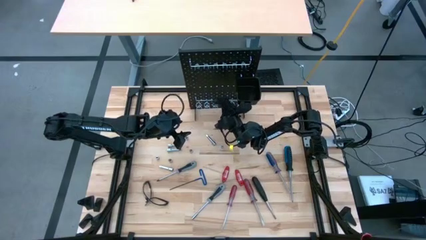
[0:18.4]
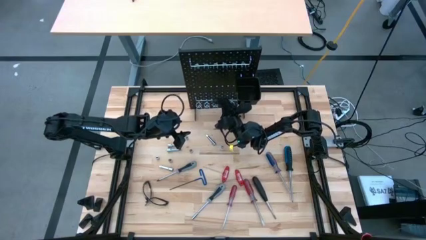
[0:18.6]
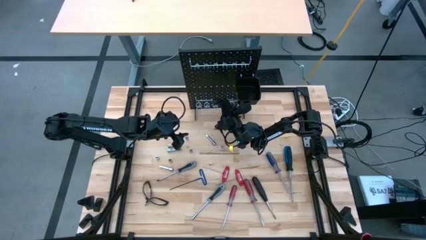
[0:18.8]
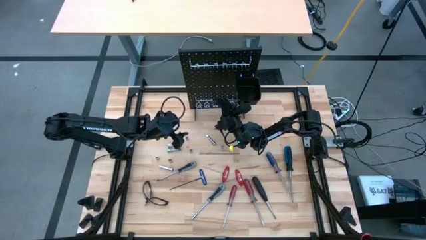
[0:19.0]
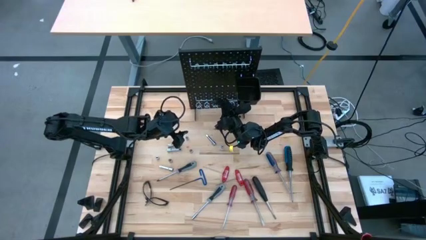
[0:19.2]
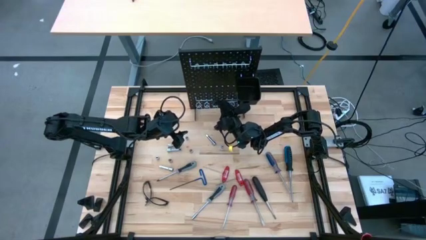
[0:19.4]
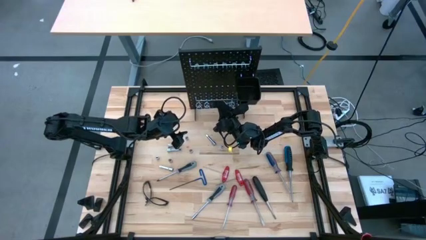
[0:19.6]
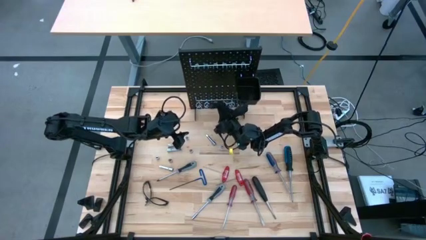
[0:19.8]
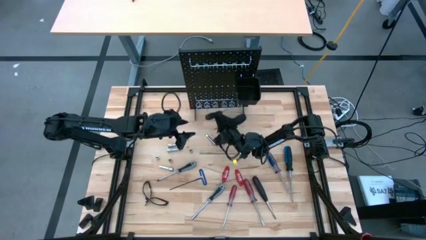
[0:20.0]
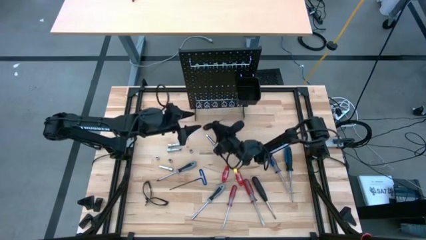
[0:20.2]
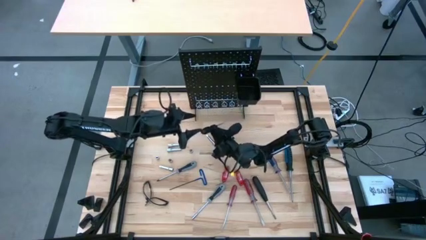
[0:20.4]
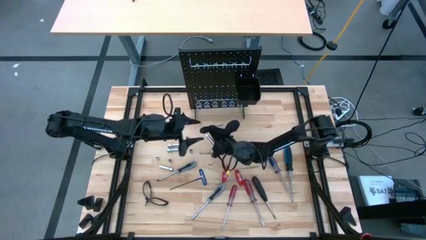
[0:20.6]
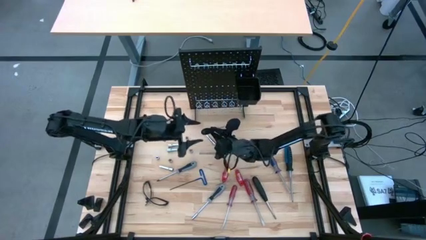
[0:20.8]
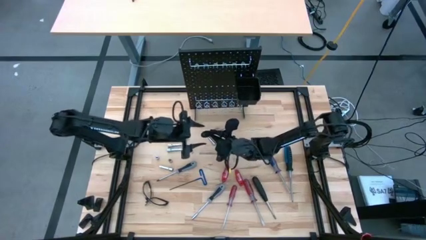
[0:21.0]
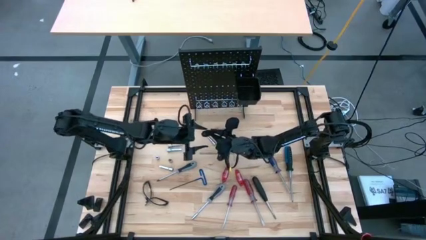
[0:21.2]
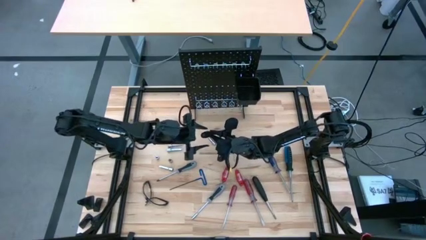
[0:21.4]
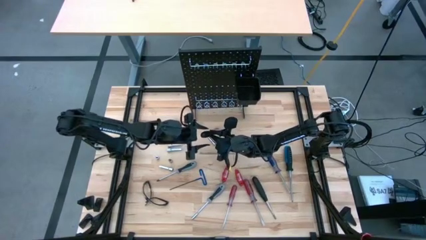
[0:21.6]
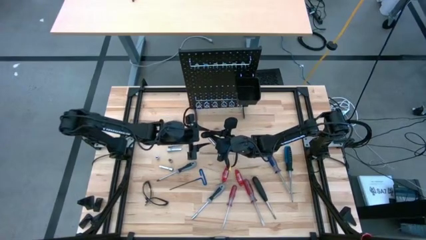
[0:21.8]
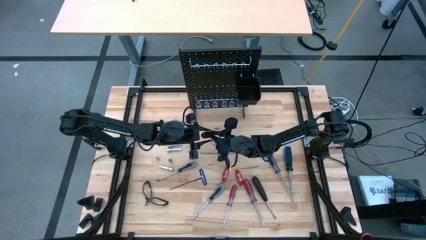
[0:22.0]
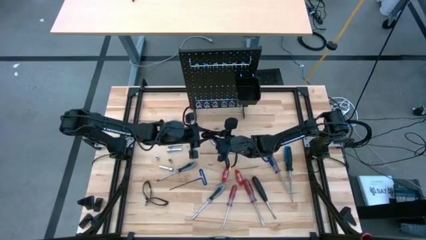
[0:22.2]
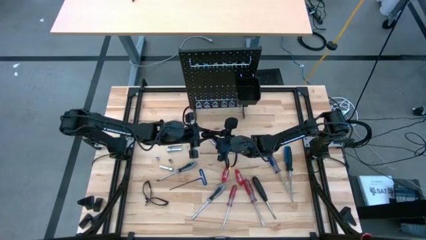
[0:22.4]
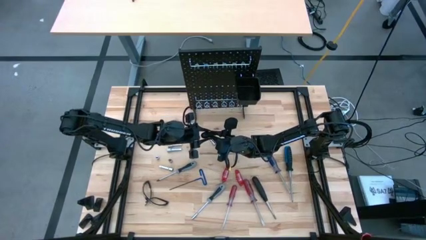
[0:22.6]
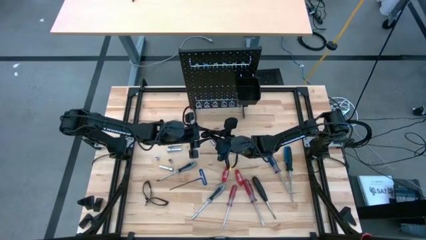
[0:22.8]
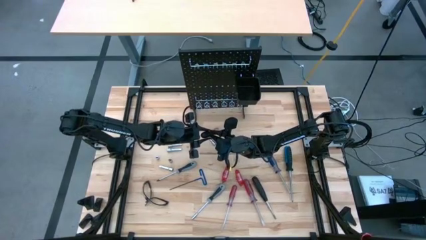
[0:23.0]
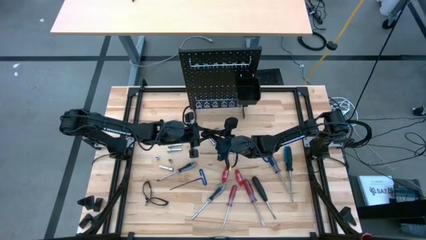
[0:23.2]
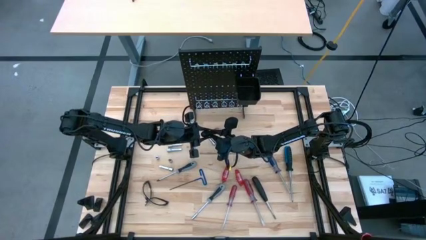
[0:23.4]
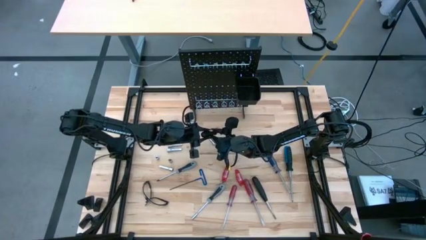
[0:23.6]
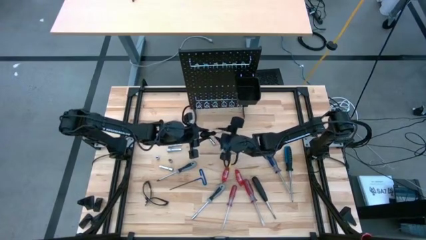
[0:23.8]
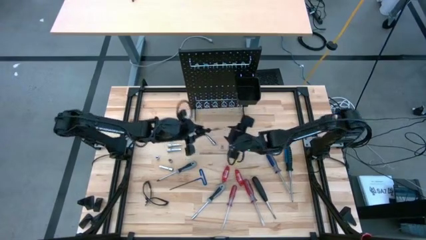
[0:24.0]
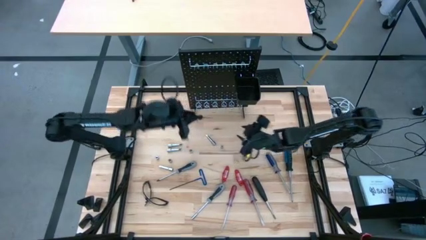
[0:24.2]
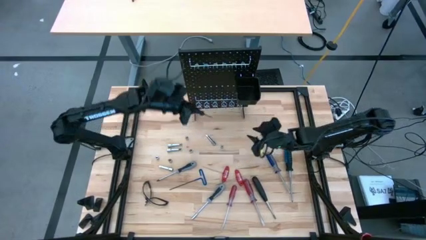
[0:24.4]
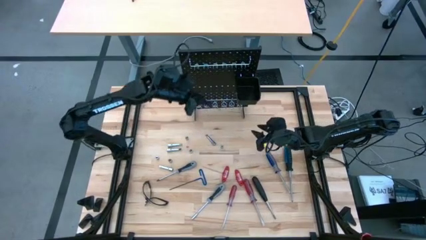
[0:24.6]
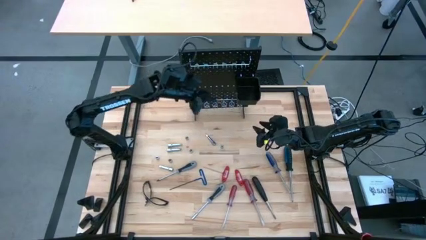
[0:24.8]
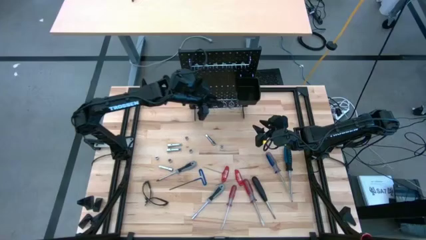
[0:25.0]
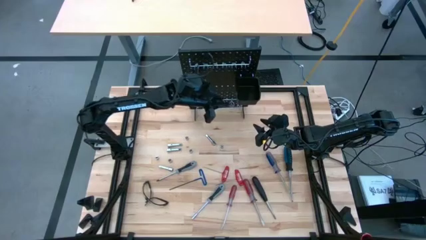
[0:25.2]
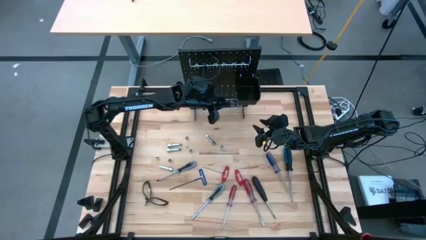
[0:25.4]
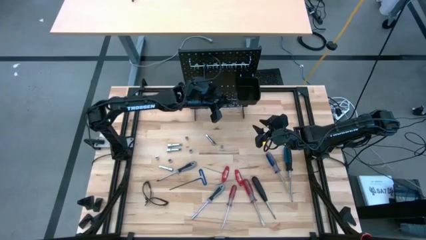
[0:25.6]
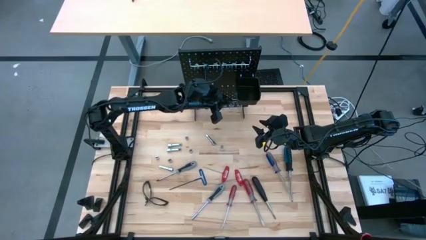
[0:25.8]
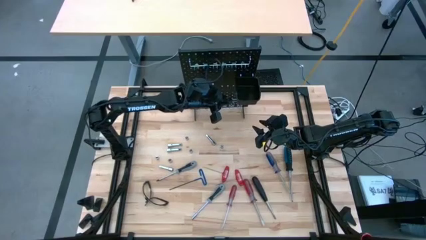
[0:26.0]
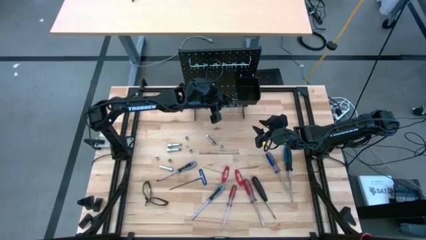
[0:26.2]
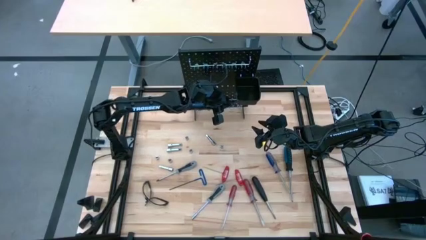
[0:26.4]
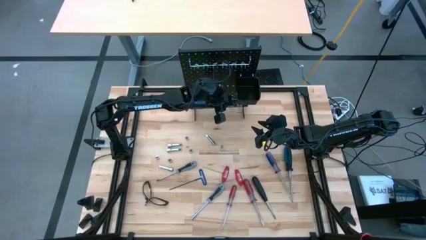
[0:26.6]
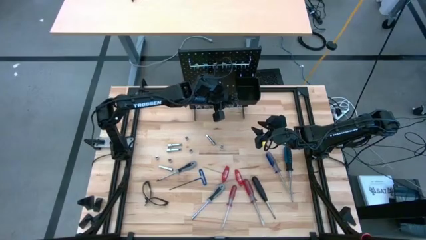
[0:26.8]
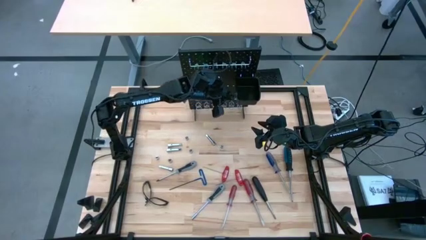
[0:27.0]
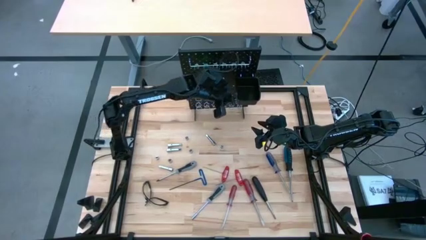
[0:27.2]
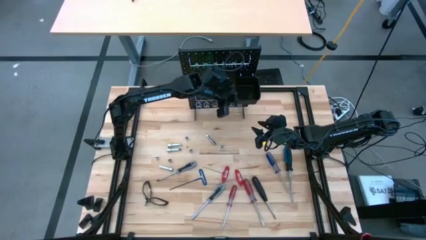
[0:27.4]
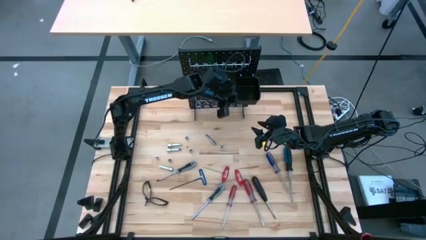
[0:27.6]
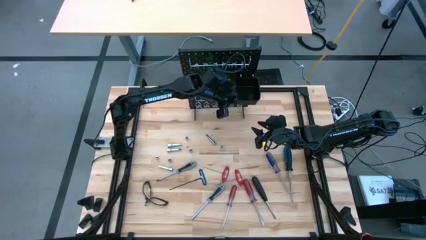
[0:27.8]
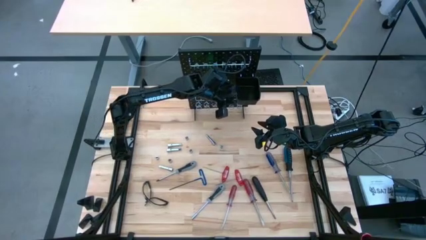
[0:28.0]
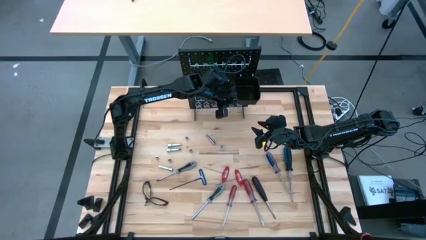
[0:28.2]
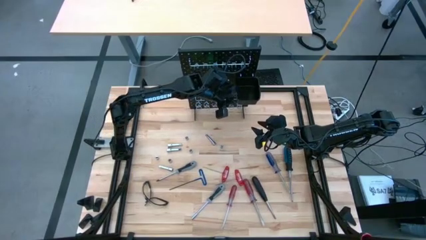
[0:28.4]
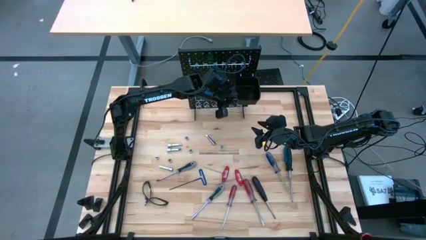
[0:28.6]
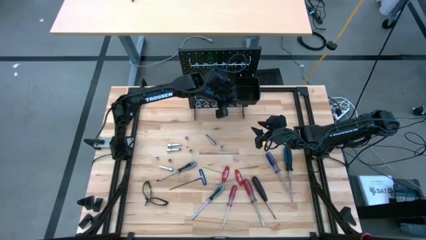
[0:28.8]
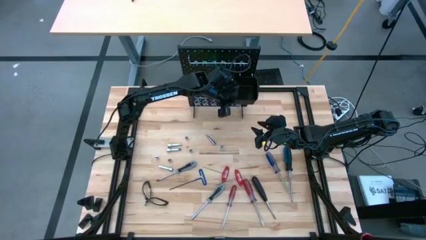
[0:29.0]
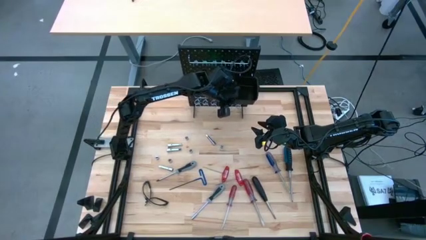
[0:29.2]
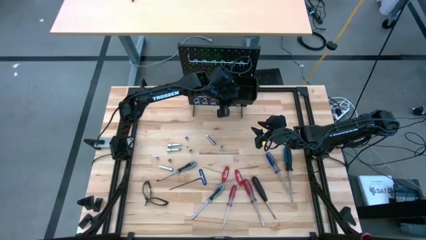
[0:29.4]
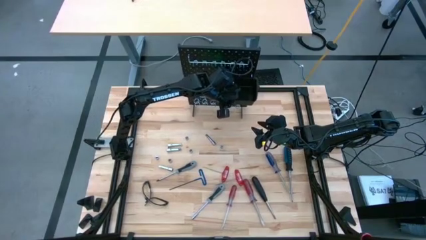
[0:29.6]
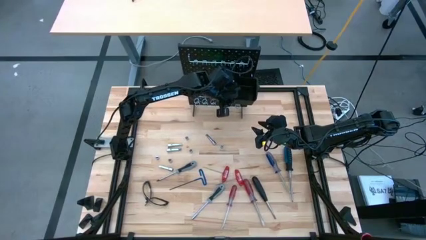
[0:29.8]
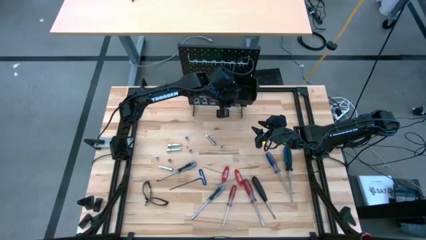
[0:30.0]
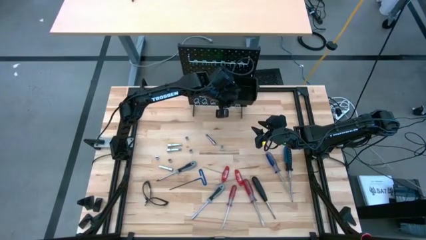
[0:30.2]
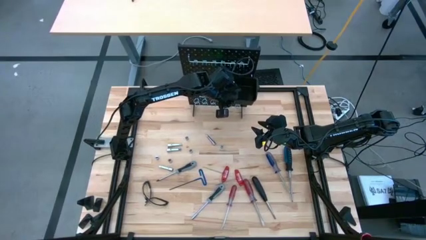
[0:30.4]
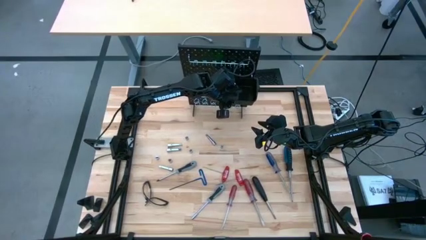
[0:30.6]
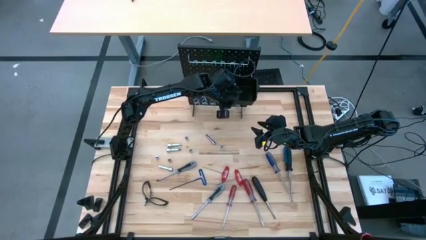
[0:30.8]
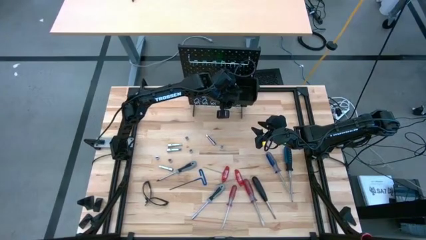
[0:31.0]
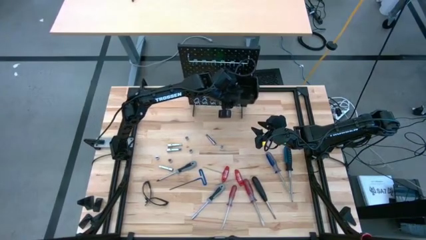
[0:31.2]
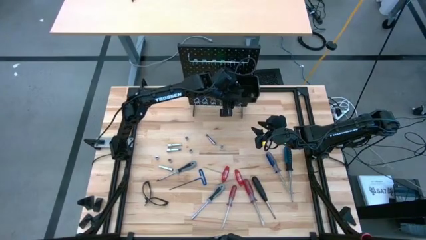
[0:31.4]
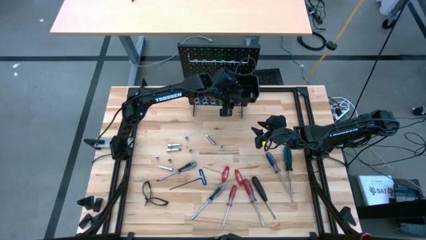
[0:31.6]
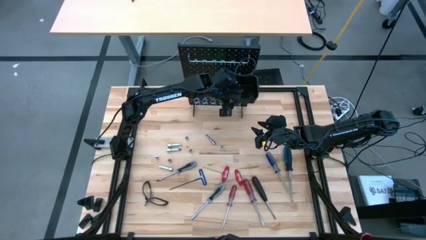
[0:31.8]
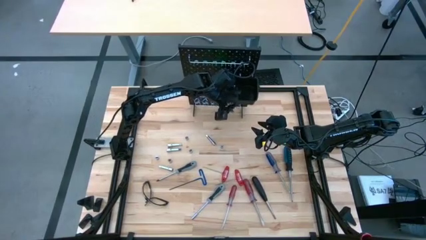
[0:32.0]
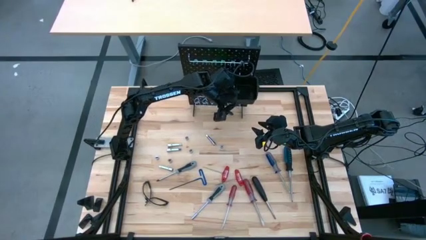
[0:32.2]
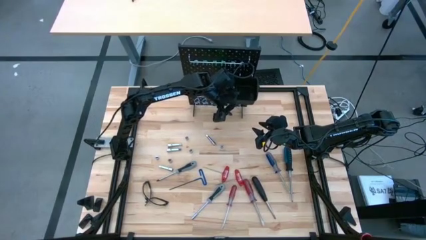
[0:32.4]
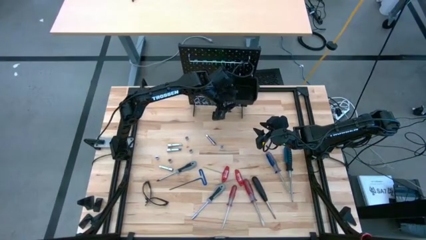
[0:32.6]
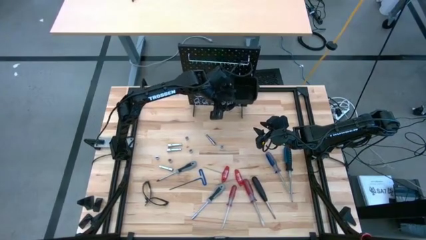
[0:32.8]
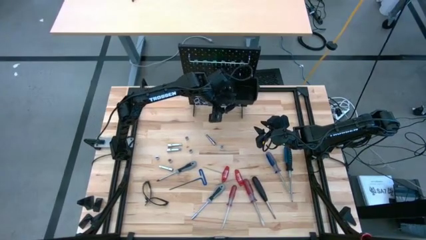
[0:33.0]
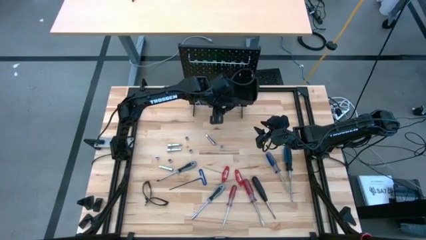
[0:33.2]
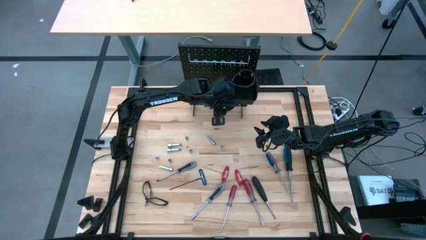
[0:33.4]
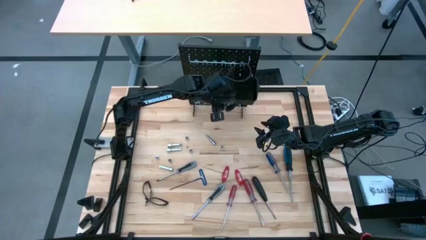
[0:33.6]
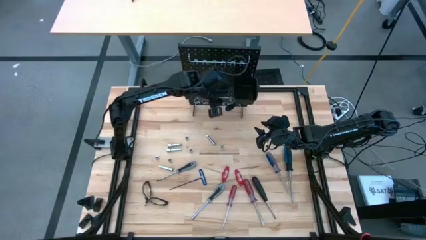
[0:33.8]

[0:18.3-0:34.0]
Task: Hang tools onto peg board
Hang the black screwdriver on the pegboard
